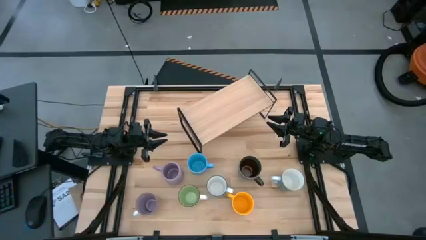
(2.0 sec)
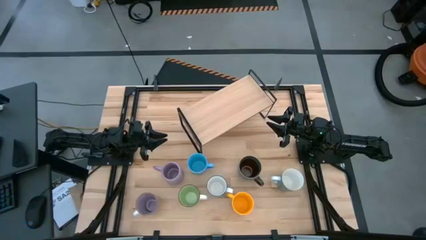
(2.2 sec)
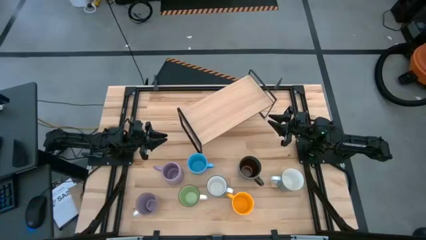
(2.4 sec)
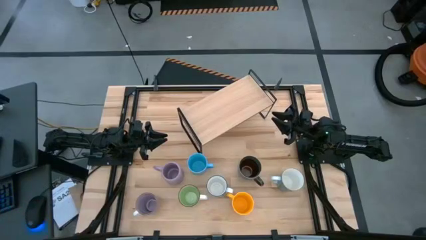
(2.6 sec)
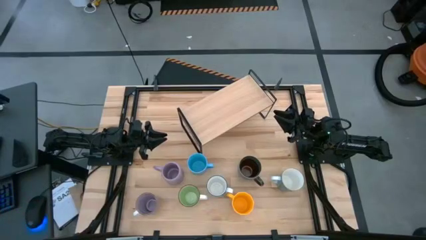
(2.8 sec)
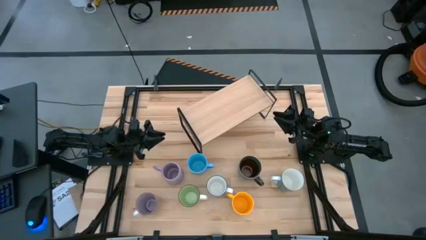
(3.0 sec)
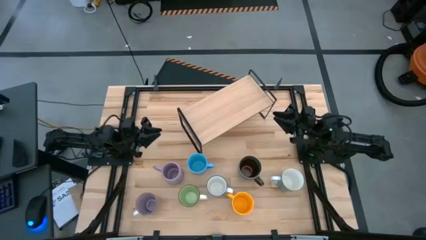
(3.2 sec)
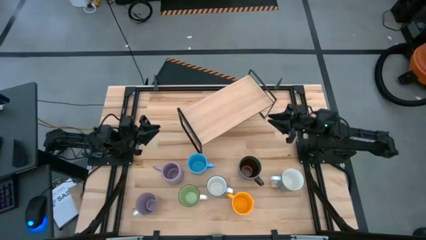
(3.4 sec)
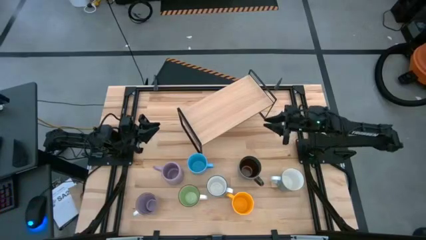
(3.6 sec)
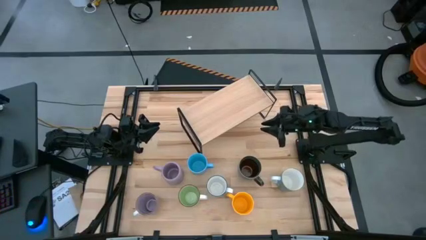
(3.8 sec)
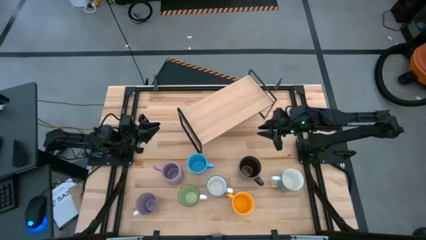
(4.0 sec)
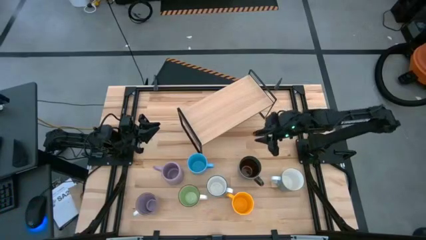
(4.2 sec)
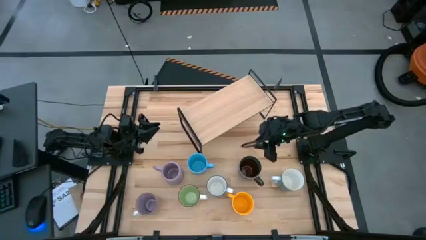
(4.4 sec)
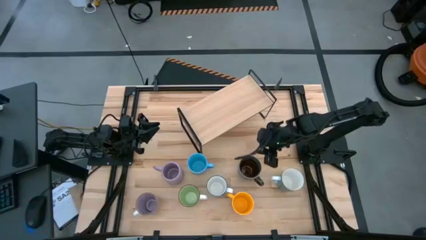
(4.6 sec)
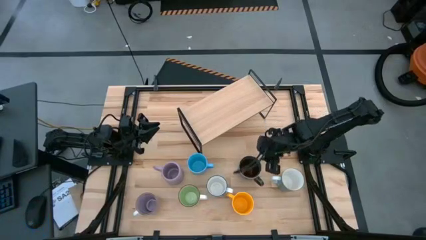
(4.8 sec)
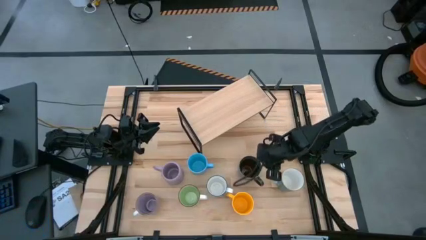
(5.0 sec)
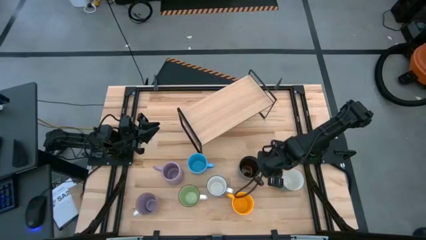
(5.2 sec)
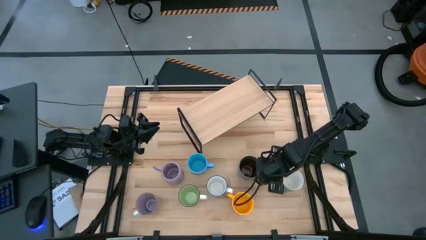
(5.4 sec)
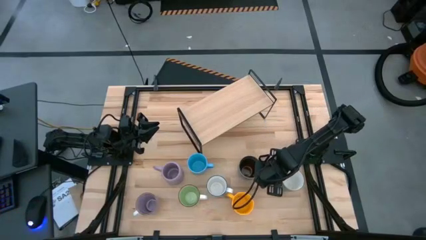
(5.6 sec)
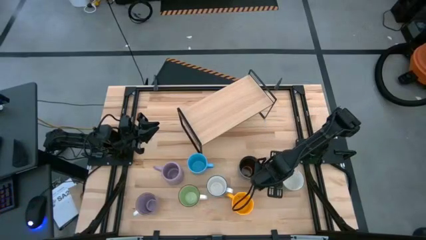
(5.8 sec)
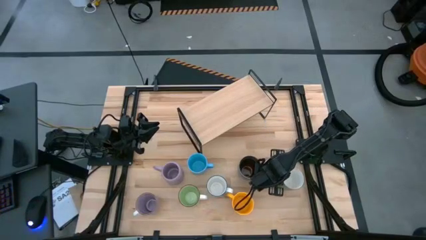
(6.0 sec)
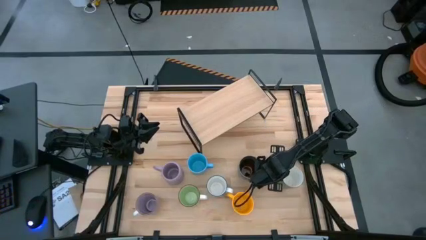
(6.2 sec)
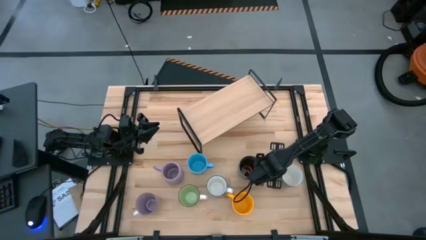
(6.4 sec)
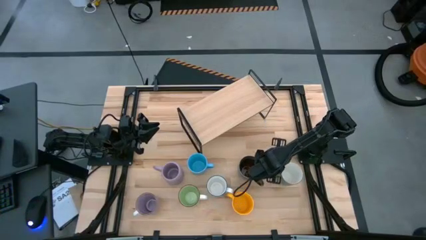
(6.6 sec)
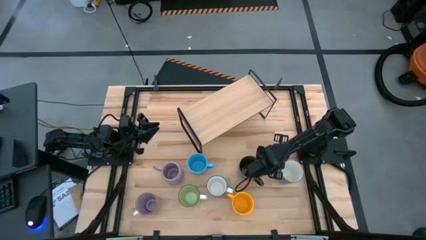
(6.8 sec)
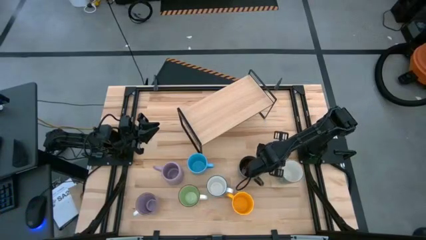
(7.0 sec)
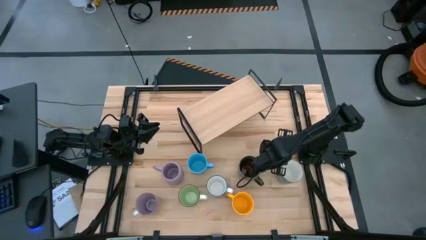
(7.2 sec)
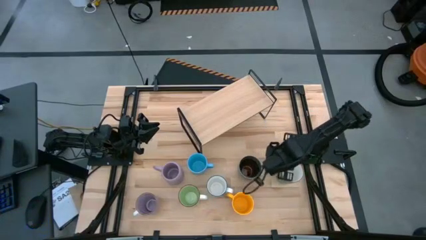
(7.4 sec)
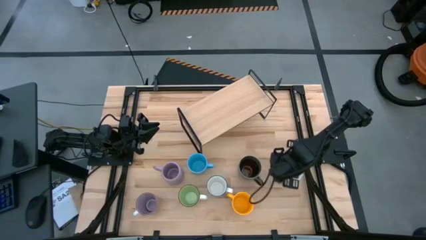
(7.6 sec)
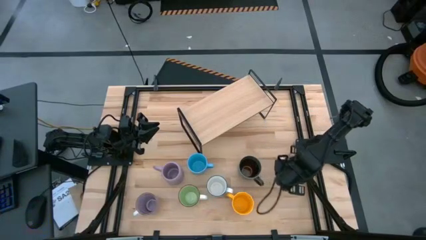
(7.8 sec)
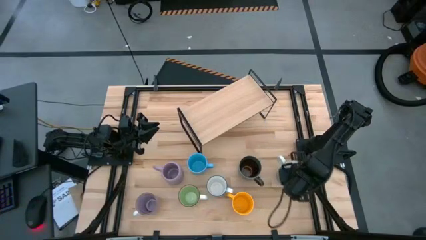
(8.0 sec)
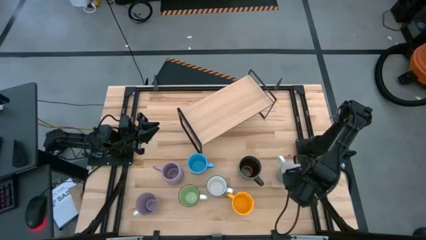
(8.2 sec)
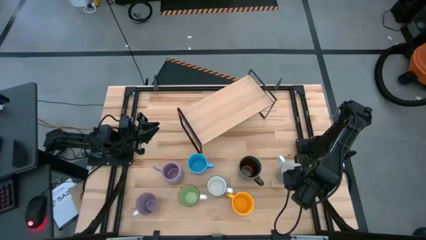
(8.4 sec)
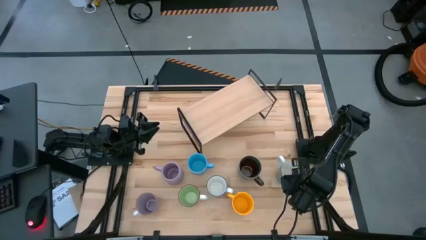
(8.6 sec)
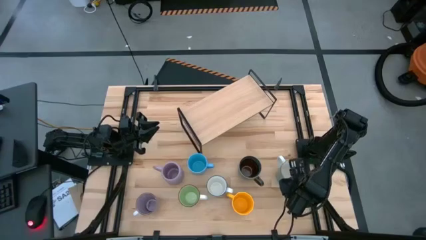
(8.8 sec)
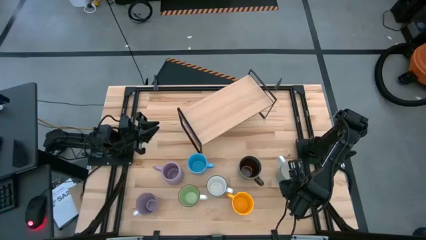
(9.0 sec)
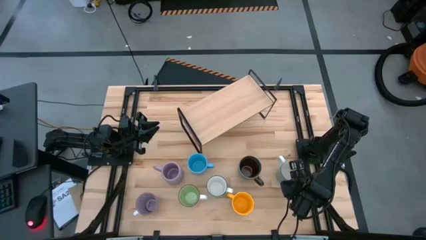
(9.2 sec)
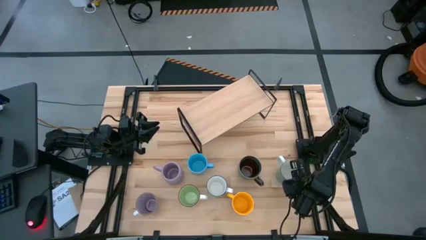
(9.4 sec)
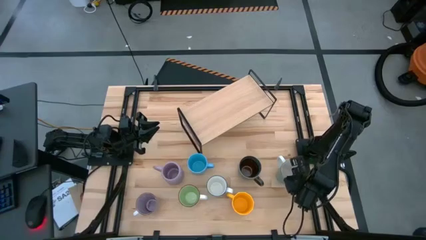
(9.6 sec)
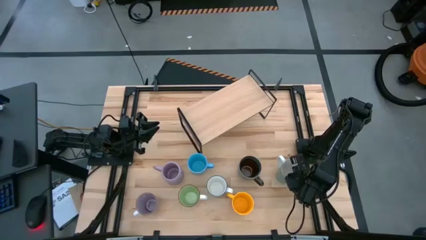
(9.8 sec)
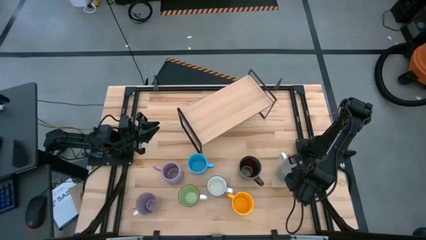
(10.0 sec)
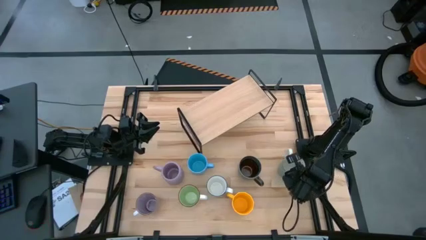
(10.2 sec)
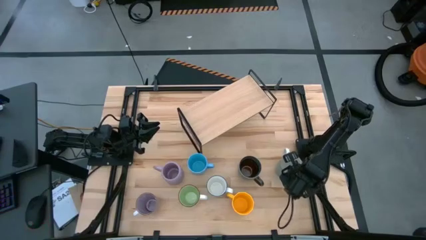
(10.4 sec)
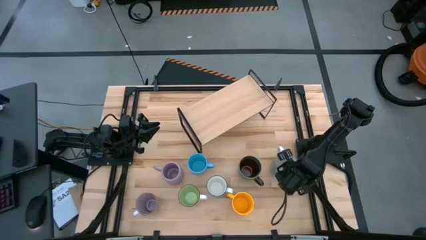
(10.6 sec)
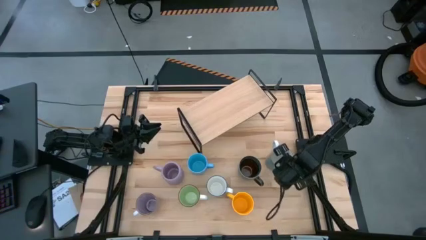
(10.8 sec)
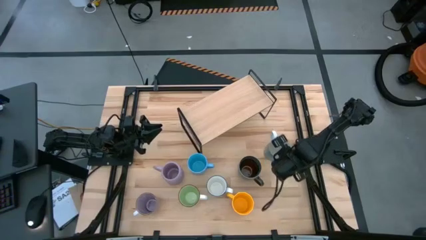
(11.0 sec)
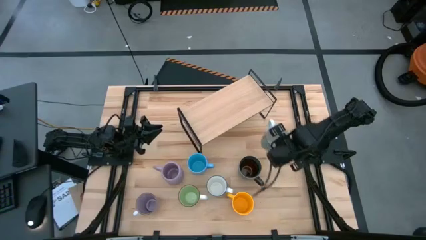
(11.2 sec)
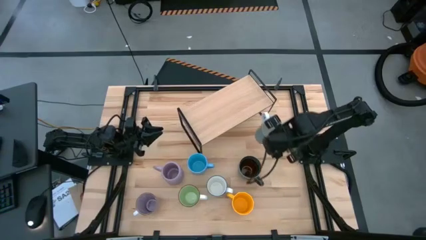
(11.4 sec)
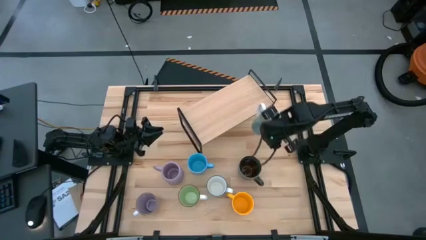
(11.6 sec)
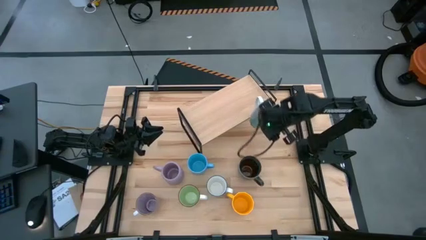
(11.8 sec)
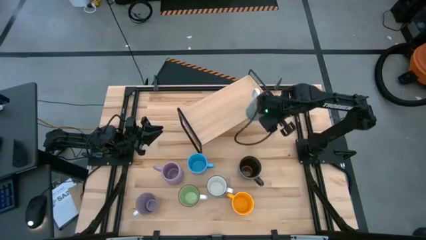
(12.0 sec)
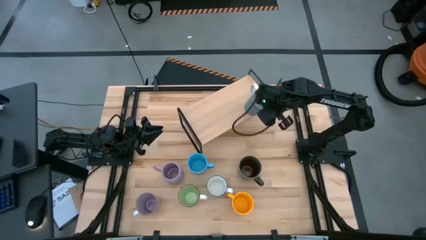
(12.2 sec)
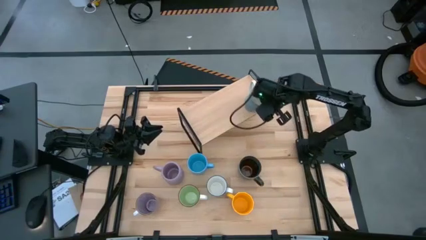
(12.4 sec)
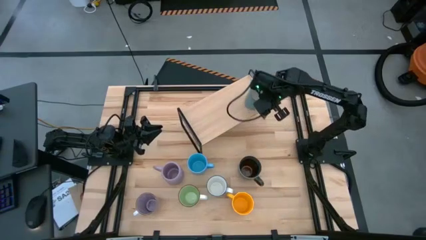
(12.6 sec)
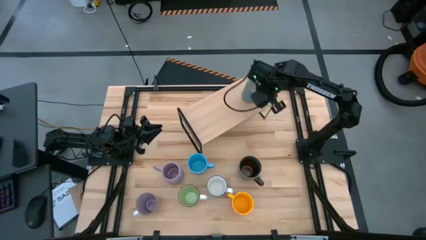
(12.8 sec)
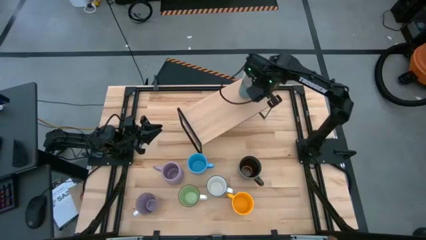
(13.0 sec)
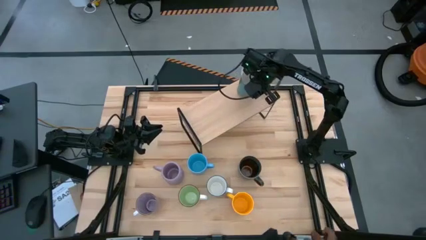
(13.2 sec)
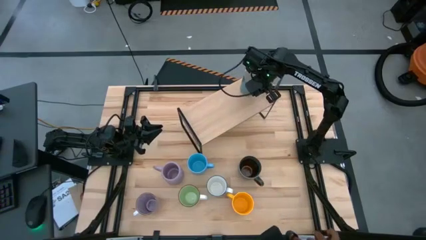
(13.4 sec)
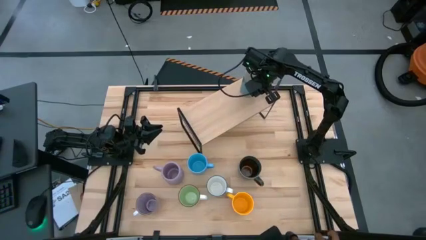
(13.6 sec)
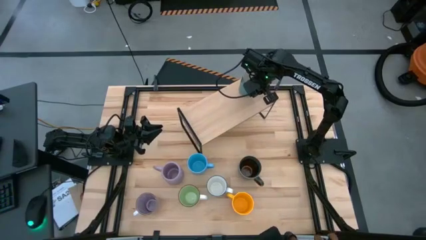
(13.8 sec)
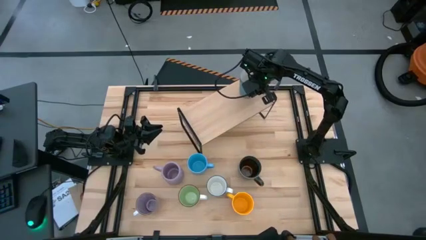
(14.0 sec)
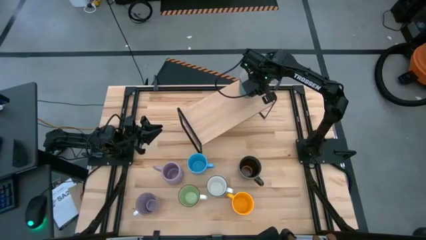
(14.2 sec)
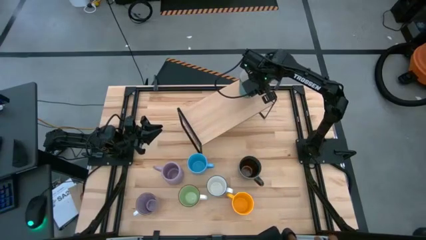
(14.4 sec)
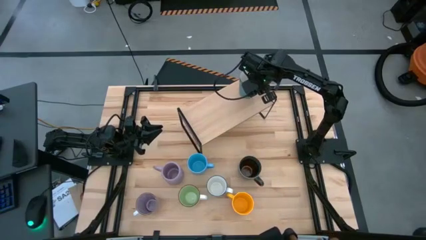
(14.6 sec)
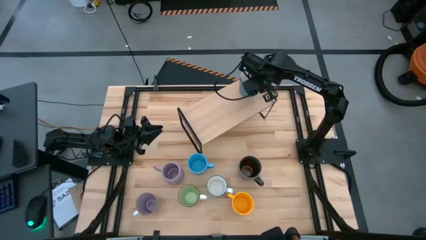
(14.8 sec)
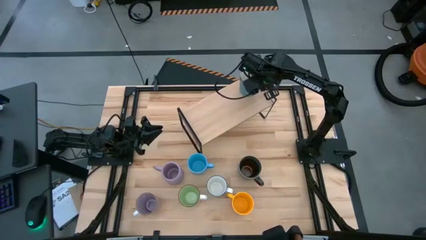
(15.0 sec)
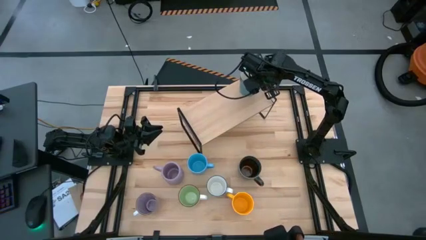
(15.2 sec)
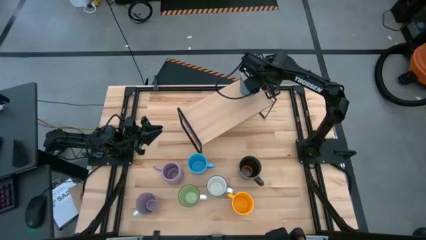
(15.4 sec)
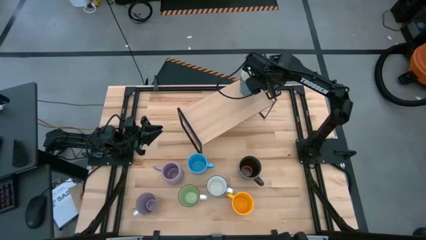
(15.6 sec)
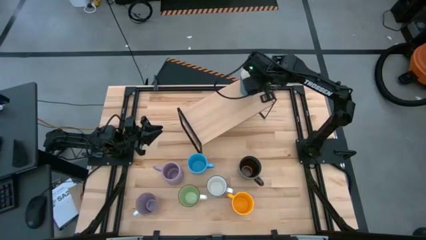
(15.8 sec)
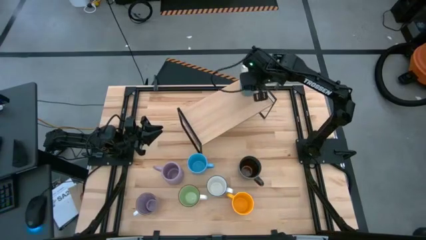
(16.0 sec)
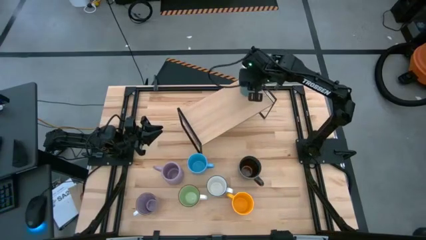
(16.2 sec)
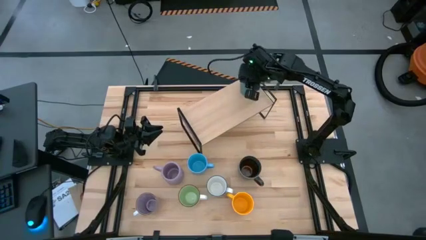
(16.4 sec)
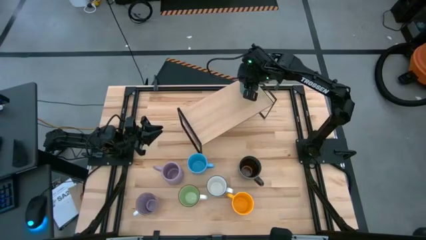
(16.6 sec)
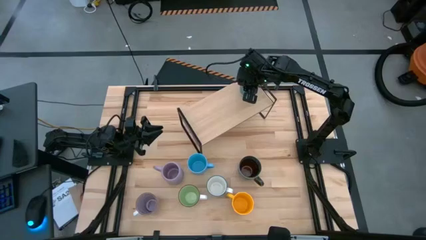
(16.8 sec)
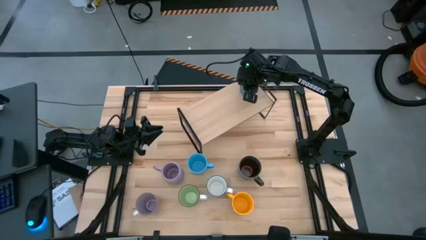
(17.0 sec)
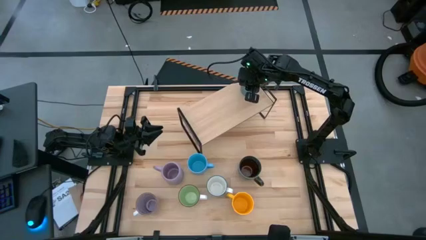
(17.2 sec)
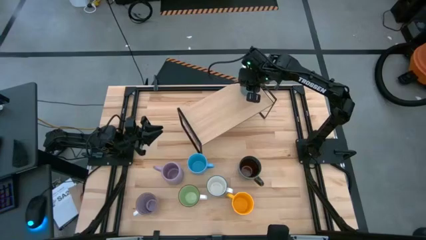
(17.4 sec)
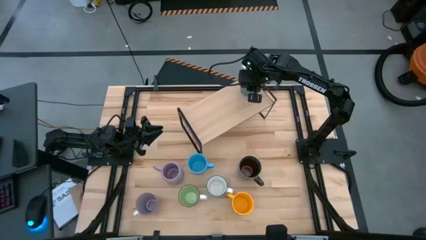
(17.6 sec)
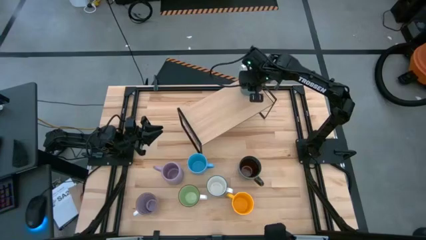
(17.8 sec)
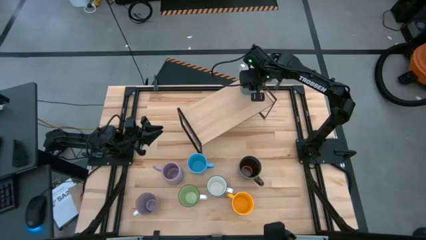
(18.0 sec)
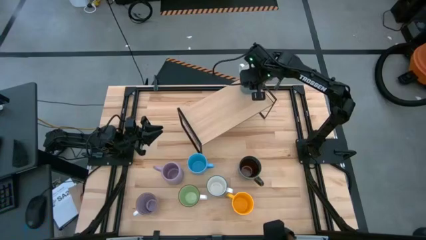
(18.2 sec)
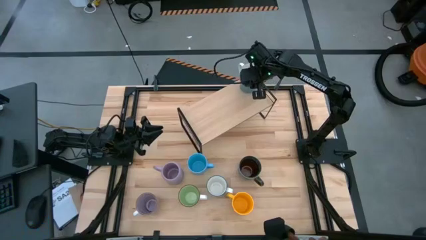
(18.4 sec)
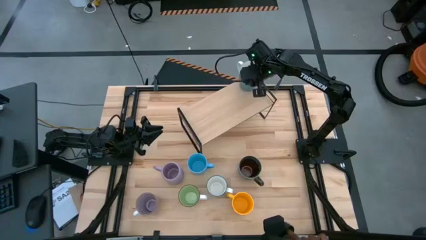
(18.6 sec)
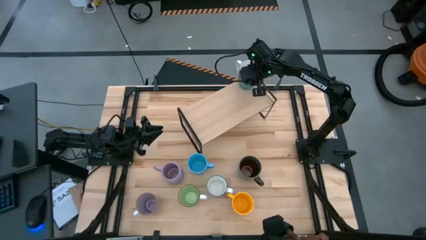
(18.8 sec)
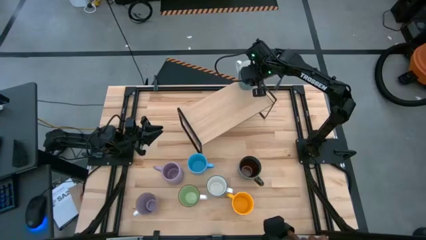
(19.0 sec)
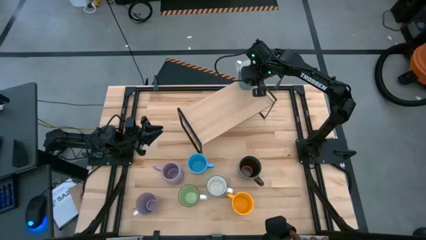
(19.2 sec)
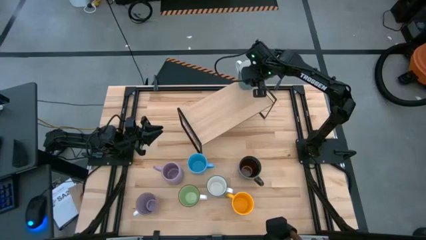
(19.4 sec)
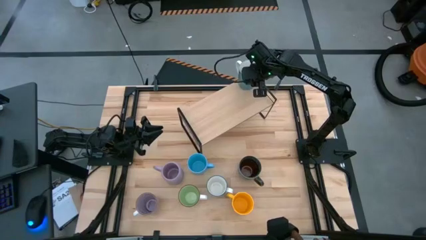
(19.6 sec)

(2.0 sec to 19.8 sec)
Task: Place coffee mugs
Put the light blue mug on the shelf
